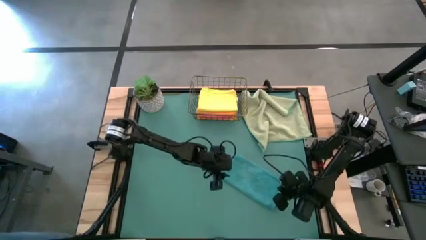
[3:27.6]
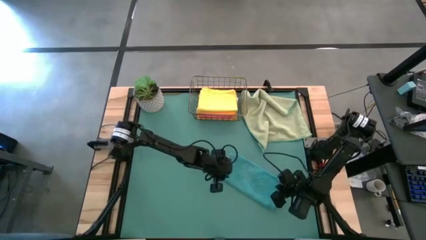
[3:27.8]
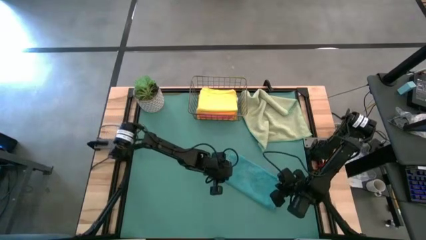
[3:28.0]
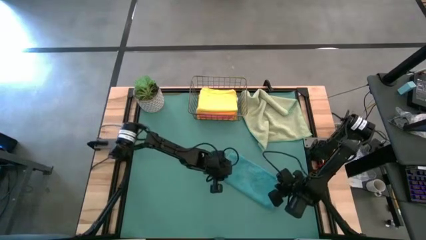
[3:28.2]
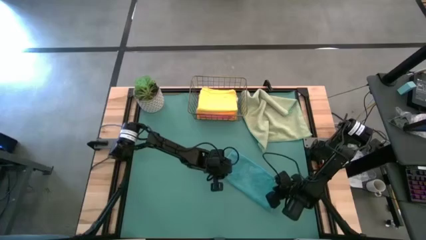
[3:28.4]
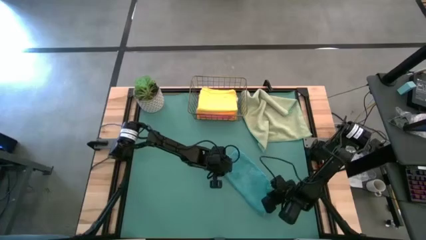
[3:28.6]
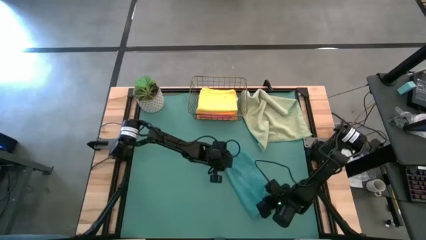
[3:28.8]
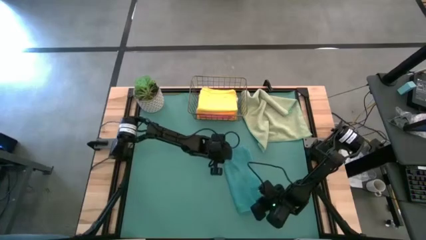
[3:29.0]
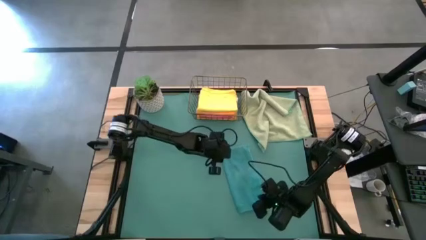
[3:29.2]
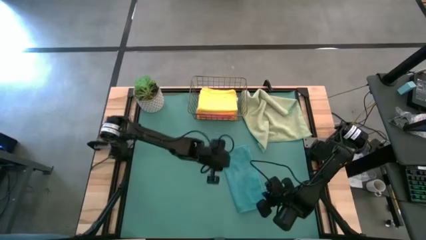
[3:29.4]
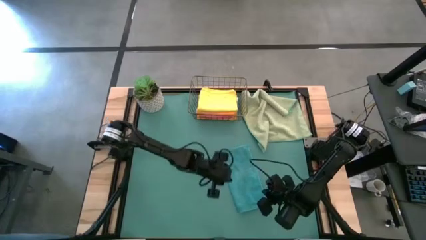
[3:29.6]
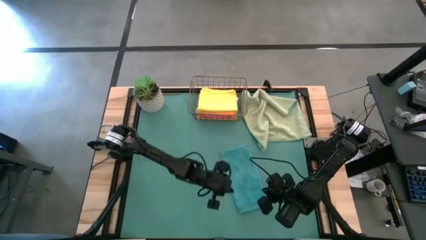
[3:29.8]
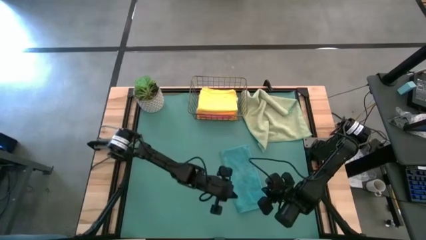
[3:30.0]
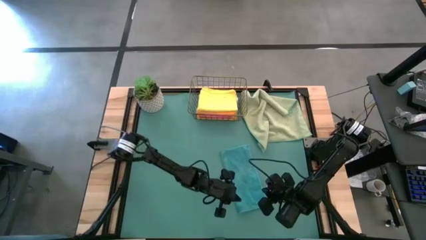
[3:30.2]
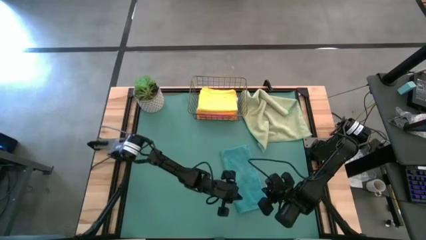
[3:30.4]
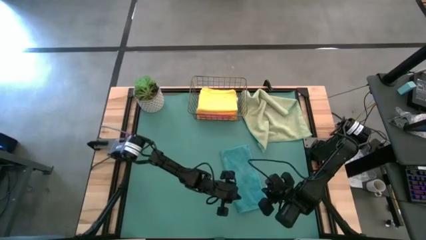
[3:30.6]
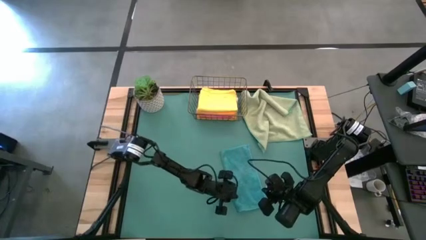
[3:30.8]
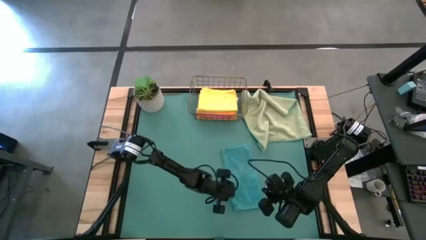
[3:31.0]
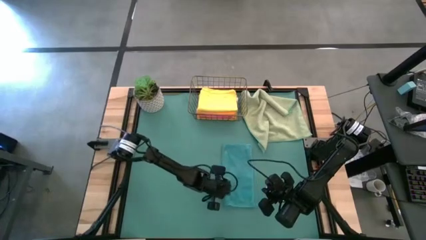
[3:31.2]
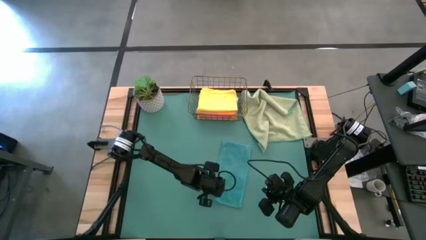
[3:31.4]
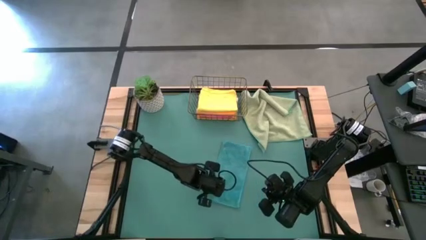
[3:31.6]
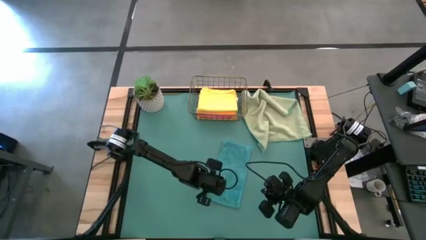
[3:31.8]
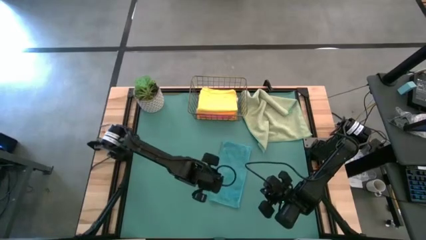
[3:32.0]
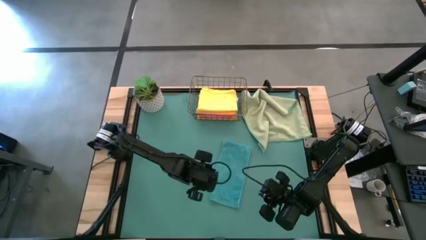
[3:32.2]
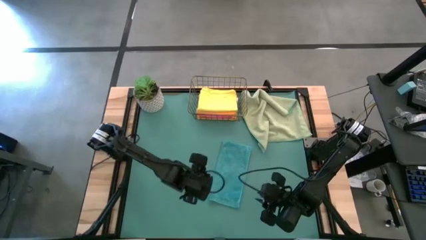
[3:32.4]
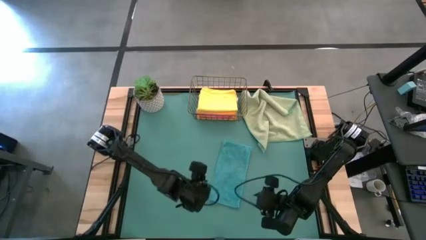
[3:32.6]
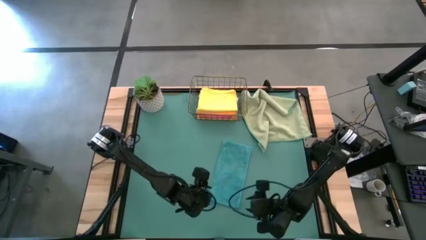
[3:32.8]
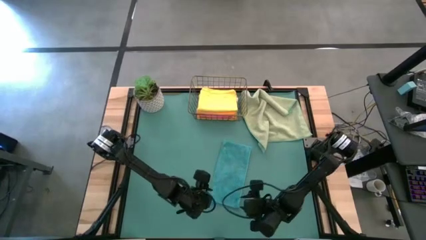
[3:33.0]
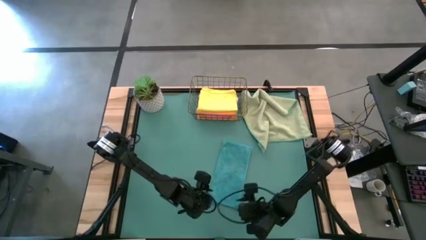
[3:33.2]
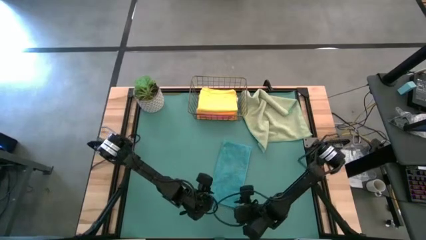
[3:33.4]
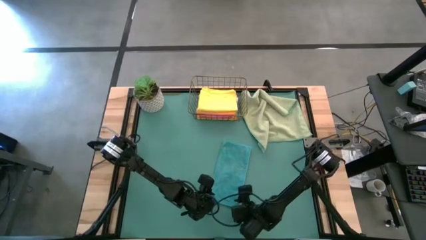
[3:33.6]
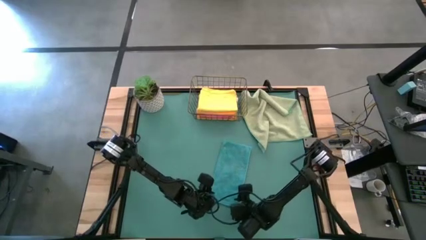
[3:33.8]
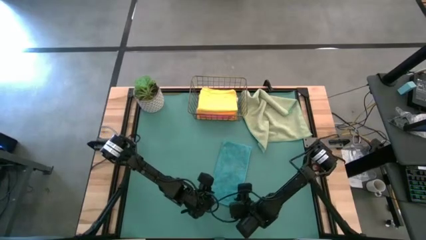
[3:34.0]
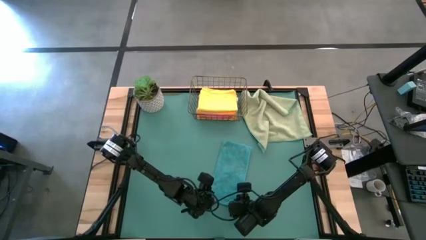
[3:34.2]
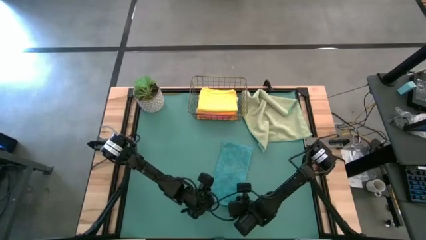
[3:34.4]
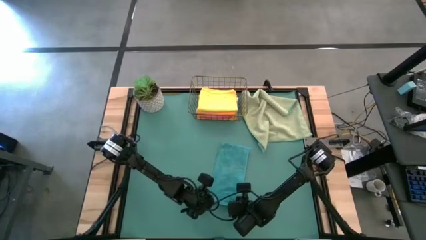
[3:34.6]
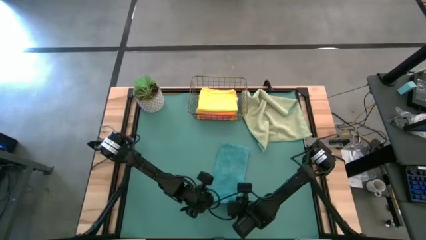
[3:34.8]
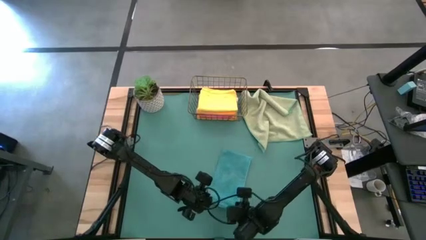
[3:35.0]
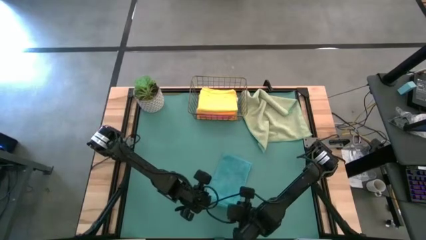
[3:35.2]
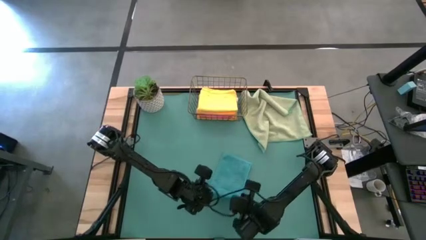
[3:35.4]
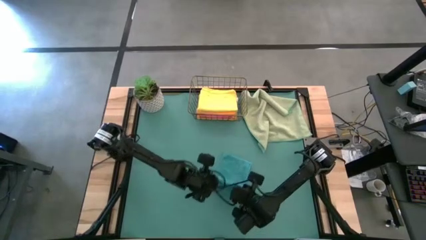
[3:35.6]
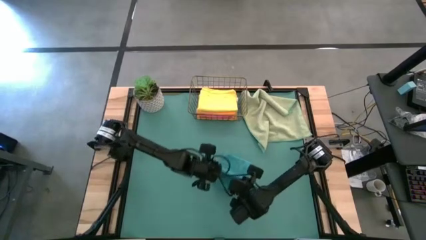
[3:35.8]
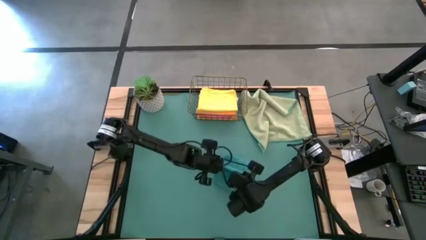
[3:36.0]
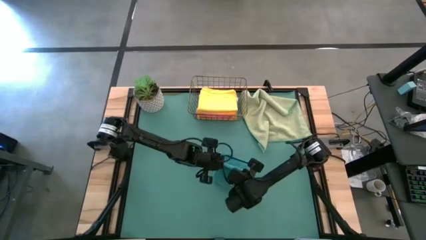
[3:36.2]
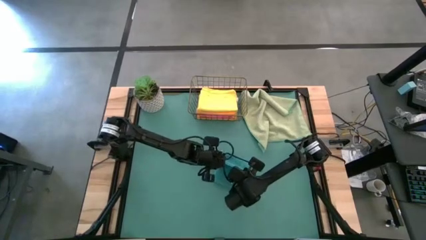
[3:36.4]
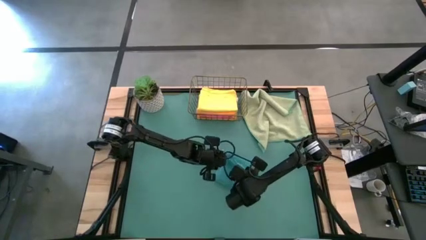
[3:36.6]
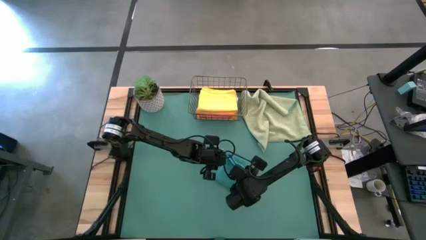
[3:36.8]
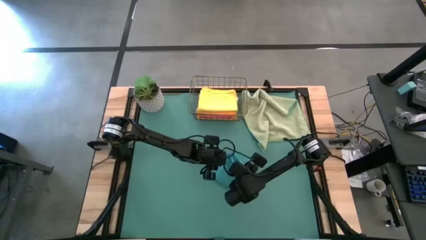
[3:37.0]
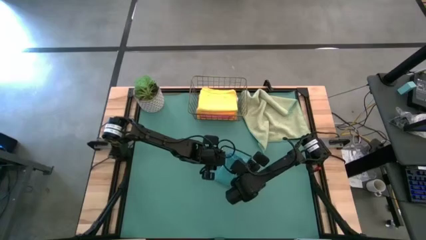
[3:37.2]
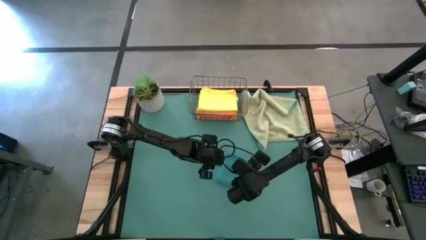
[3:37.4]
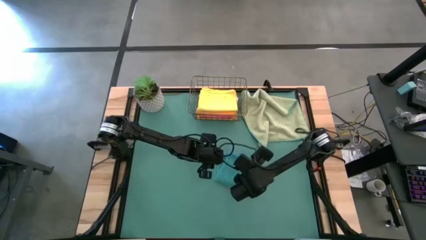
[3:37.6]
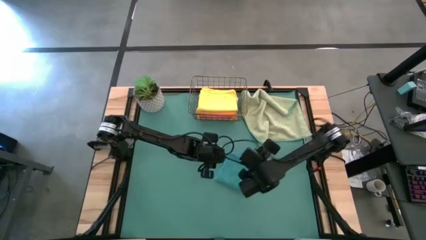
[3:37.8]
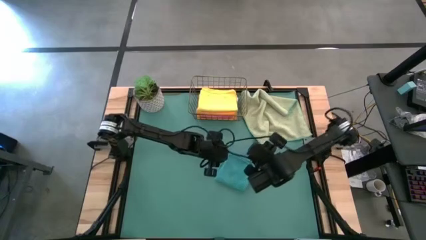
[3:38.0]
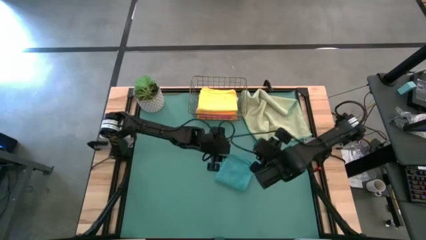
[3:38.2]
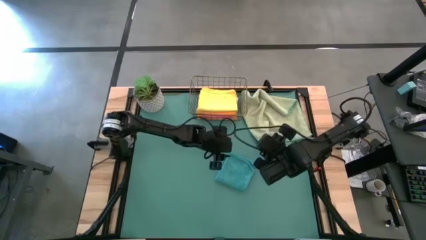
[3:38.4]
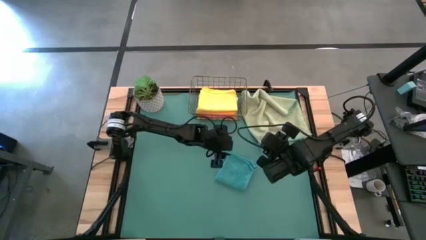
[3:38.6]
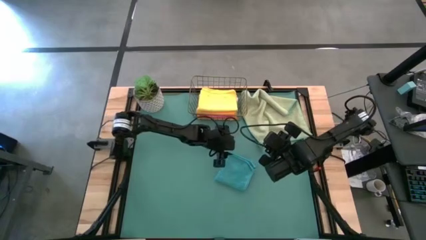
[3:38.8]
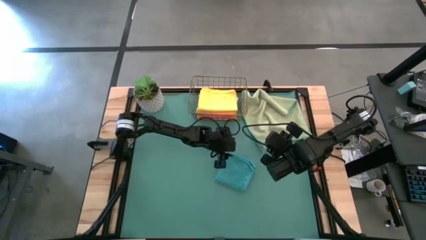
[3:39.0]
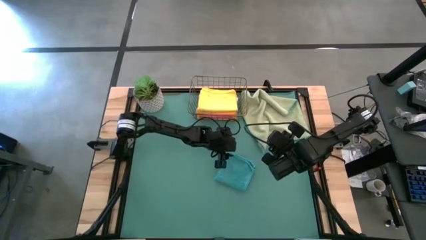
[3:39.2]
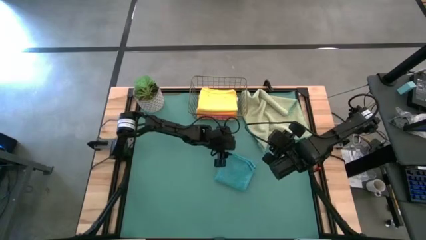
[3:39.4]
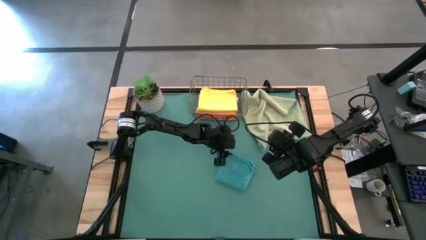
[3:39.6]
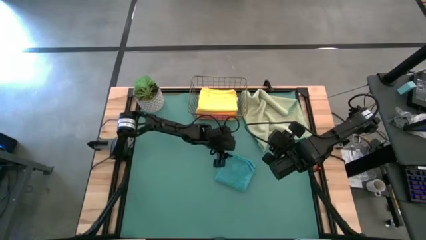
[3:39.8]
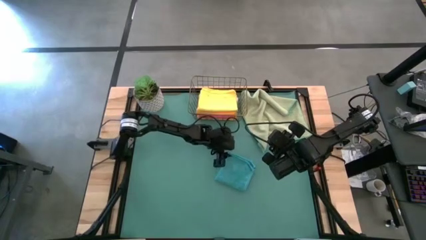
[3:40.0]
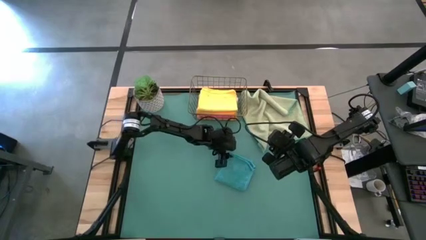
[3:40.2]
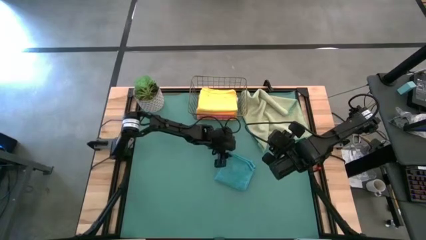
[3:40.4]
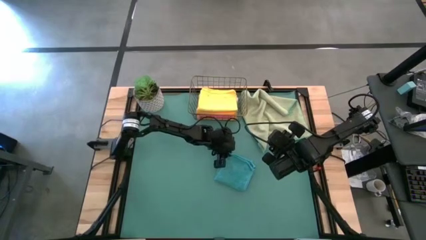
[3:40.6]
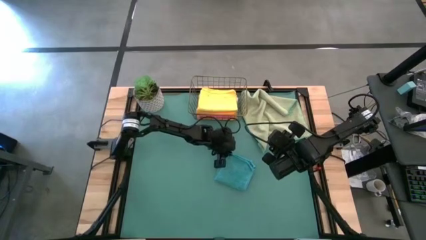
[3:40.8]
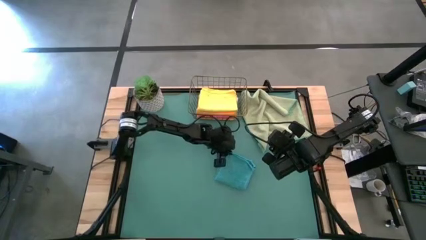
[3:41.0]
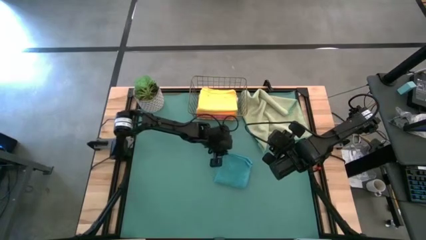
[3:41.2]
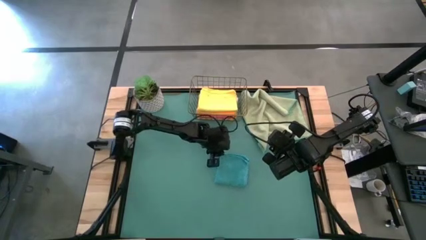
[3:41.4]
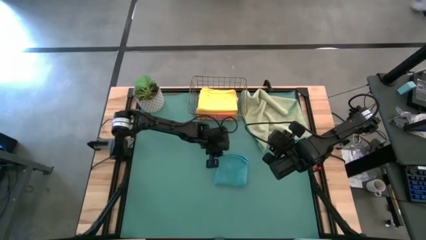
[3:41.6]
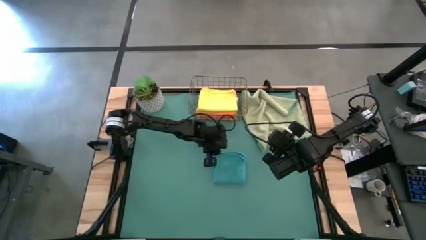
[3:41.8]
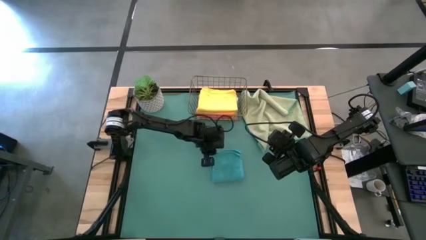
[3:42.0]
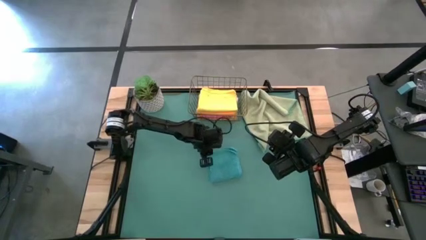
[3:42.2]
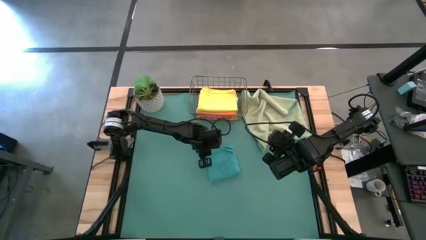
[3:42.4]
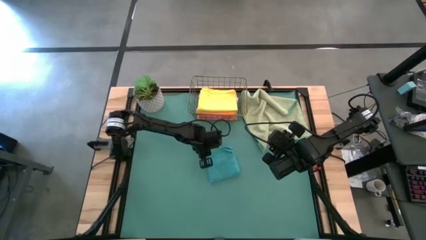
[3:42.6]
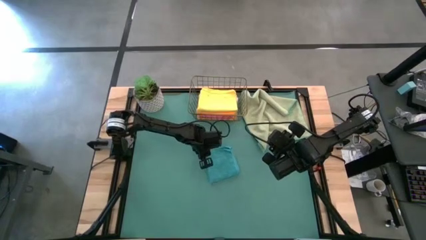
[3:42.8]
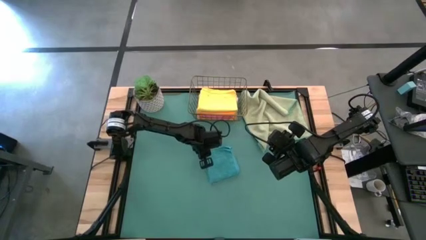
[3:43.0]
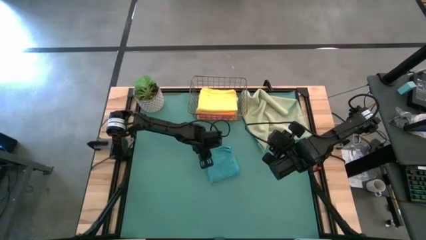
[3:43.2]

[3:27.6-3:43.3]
Task: Fold microfiber towels
Fold the blue microfiber towel
